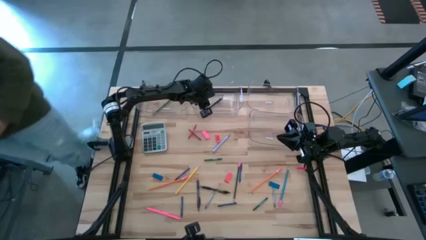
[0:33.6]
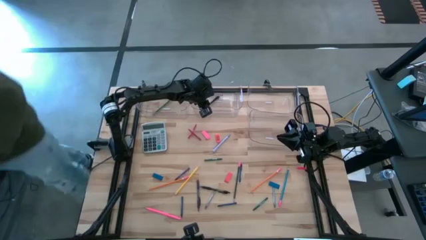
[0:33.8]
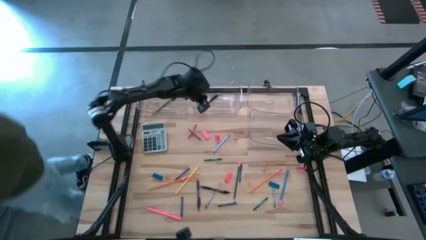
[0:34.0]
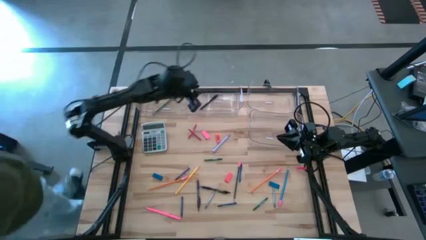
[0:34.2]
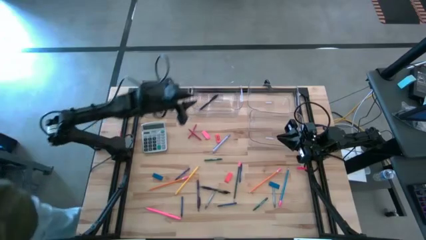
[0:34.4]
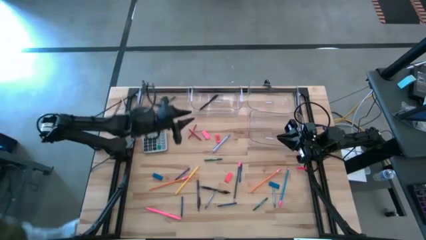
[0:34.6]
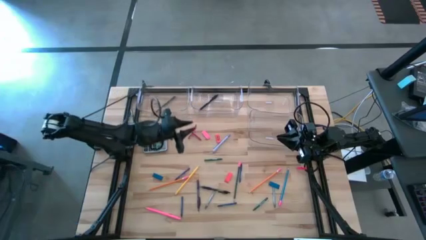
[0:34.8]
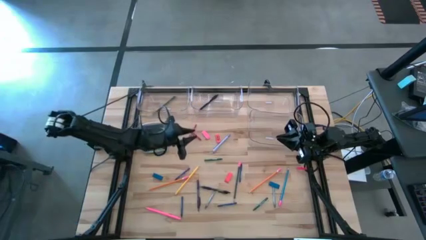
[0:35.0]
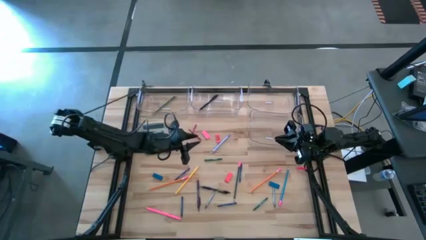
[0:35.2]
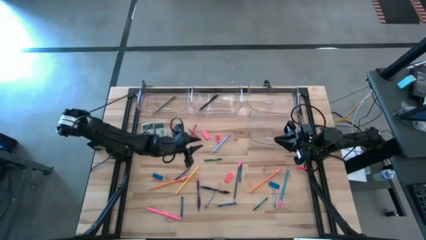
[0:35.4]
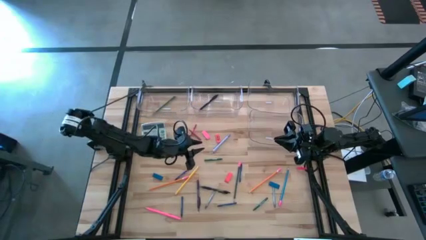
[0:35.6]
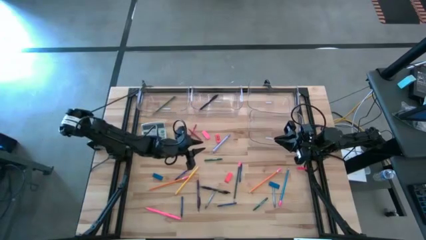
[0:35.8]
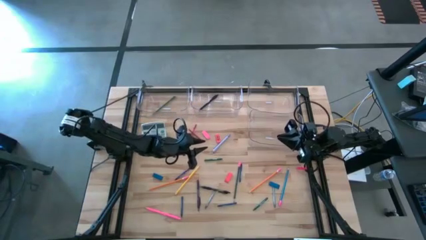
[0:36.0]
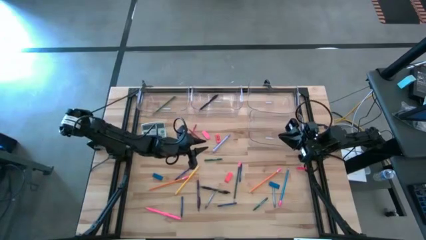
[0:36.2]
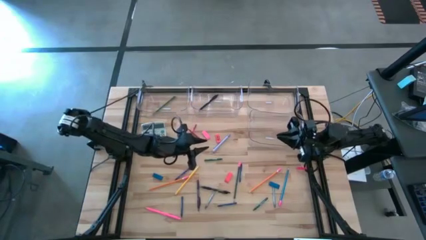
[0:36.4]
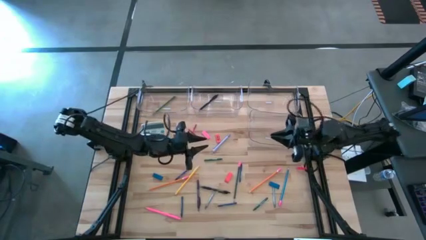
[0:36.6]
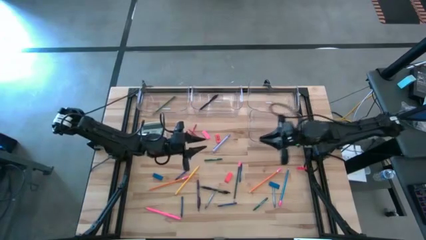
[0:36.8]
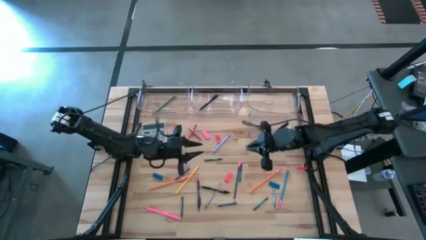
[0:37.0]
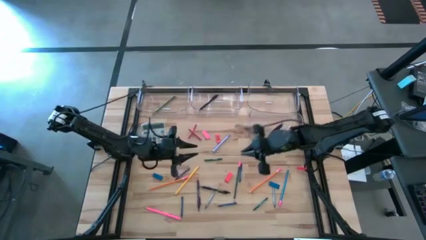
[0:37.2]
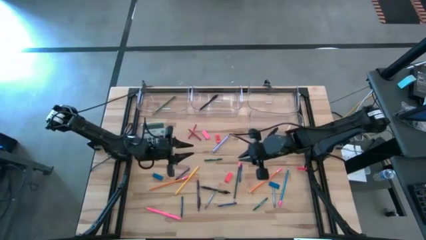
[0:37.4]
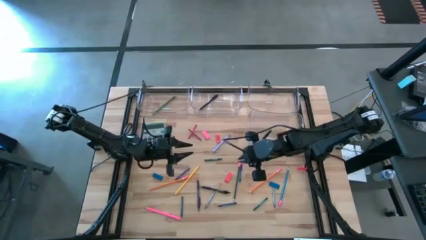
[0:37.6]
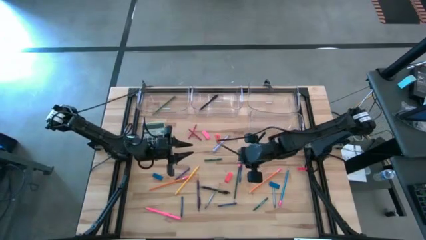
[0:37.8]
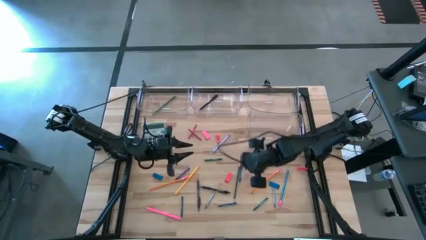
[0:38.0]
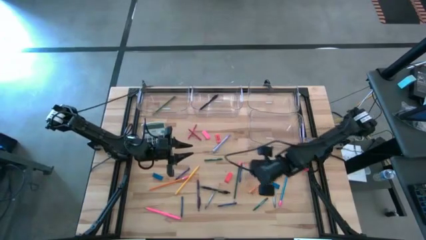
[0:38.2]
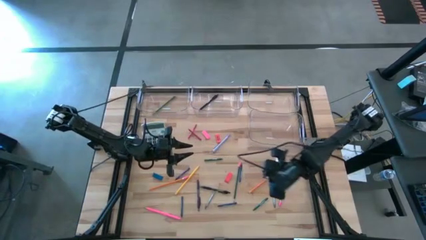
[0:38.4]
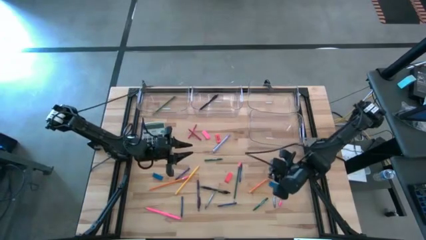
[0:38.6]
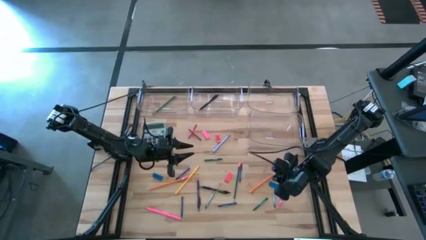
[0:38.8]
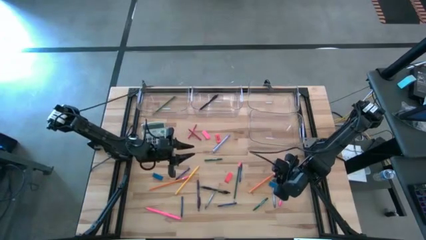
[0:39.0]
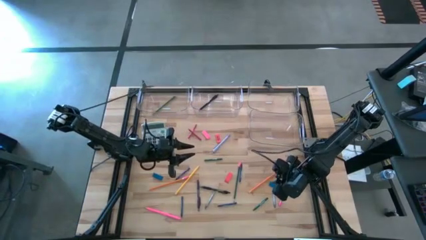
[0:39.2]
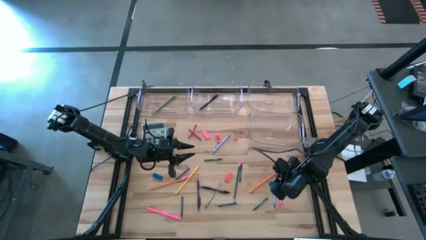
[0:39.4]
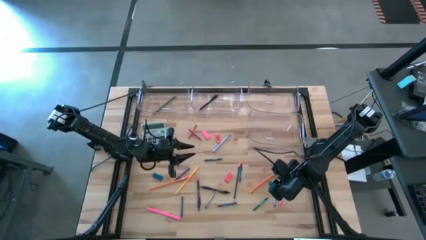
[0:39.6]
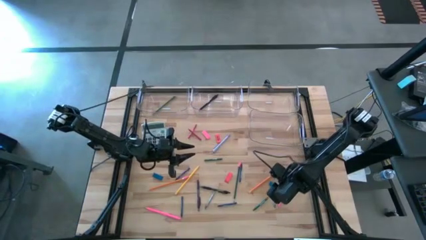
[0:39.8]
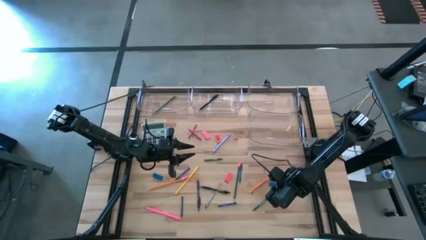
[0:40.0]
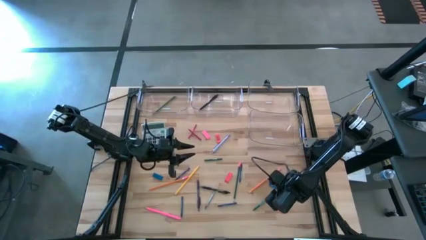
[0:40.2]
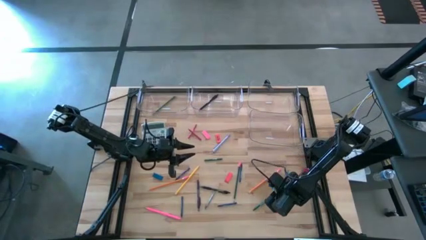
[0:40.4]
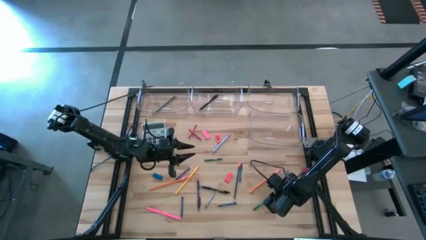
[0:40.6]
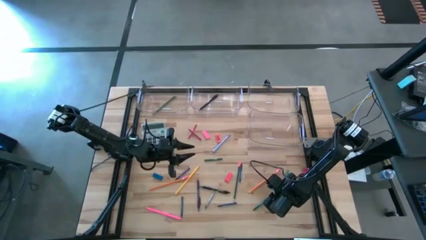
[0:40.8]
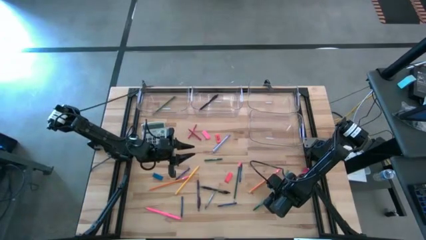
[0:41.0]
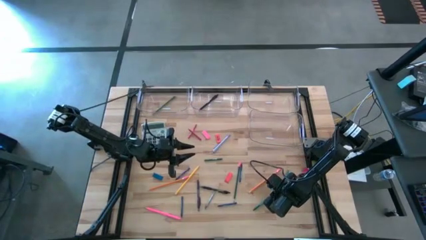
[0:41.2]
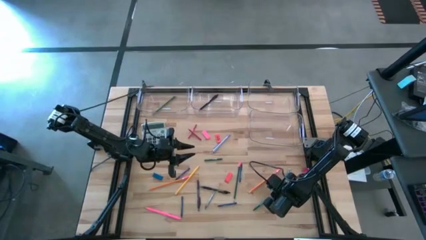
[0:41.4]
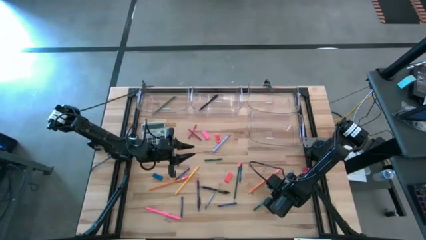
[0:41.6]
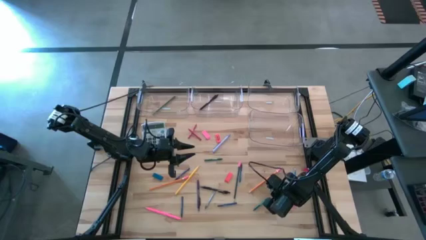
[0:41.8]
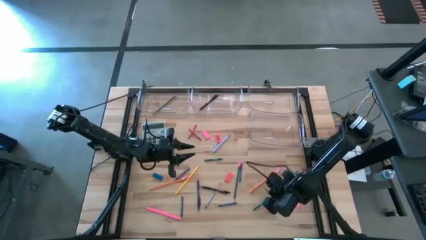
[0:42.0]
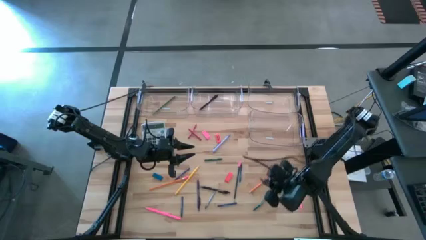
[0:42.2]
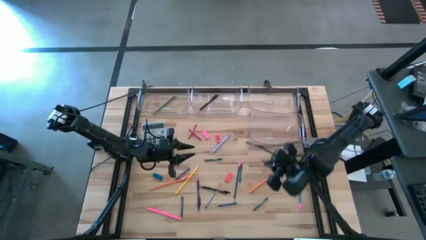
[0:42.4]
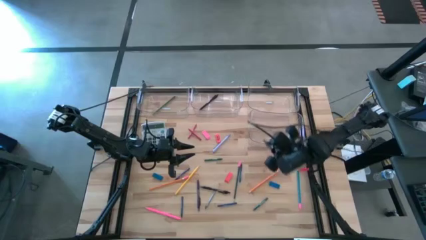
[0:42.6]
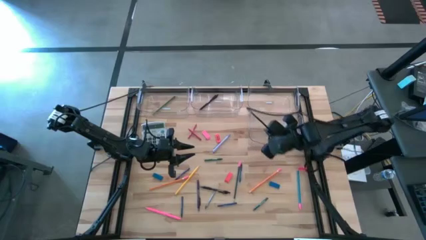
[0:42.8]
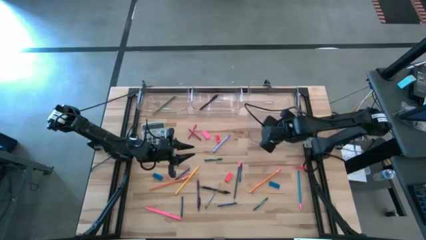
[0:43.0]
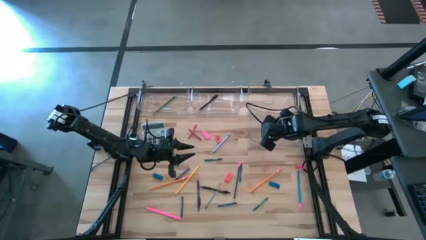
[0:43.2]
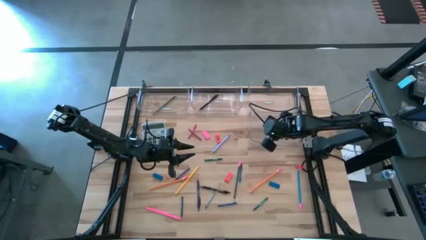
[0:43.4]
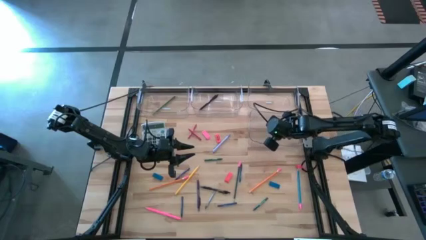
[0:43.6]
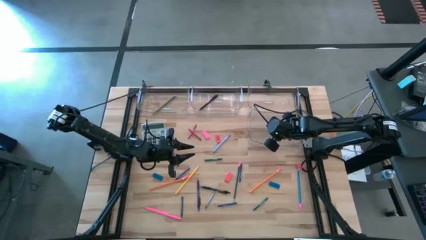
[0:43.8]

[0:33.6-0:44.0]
Task: Sort crayons/erasers/pens/pencils in bins
Put the gray crayon into the bottom transparent bin

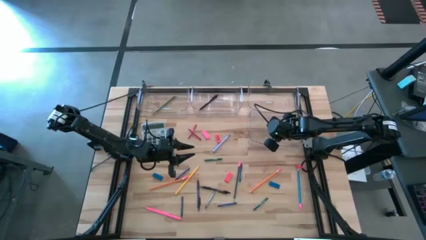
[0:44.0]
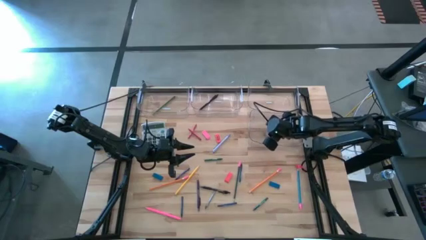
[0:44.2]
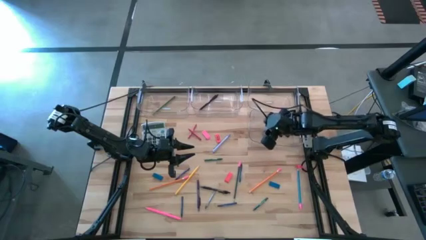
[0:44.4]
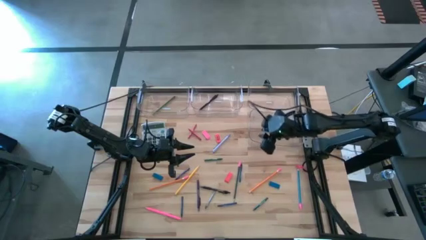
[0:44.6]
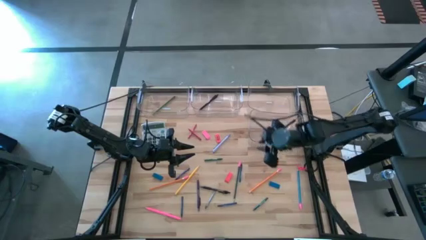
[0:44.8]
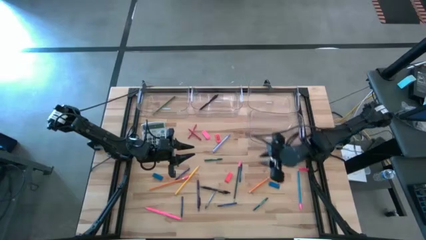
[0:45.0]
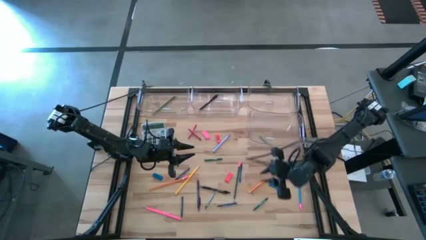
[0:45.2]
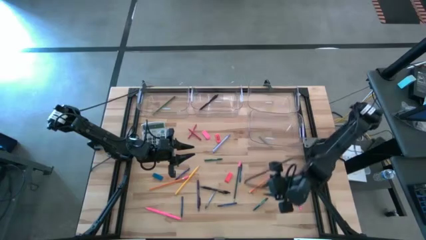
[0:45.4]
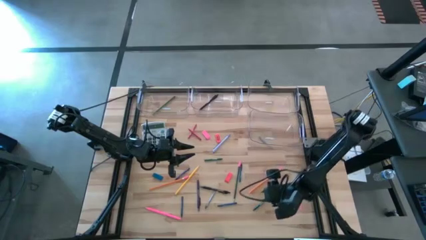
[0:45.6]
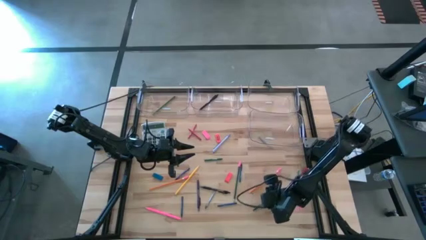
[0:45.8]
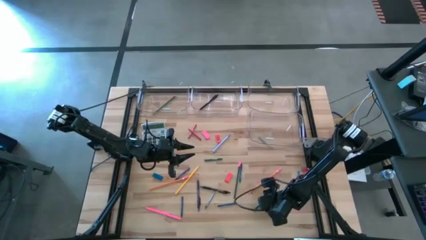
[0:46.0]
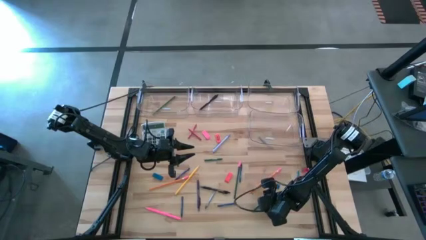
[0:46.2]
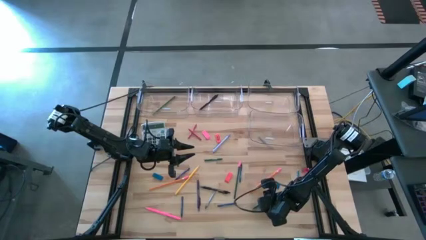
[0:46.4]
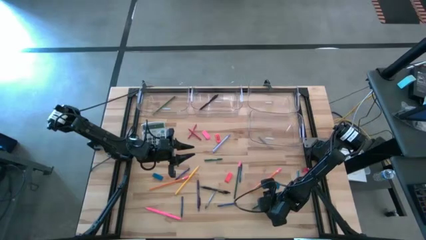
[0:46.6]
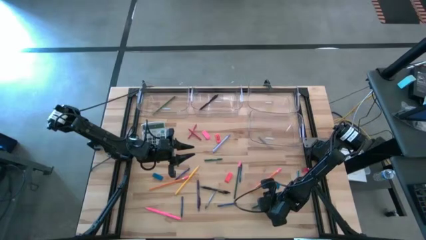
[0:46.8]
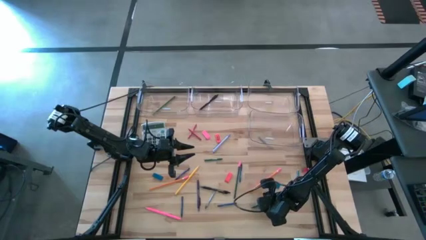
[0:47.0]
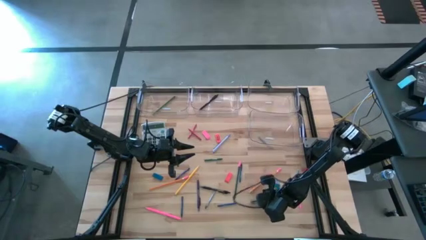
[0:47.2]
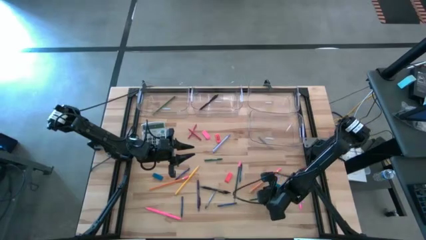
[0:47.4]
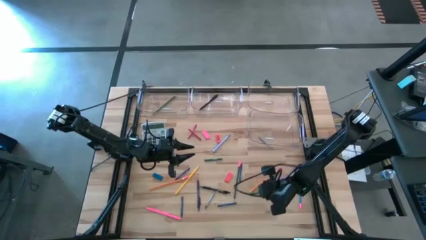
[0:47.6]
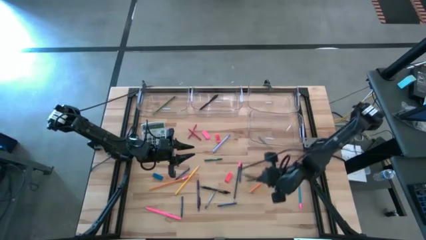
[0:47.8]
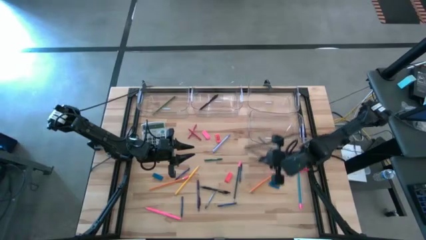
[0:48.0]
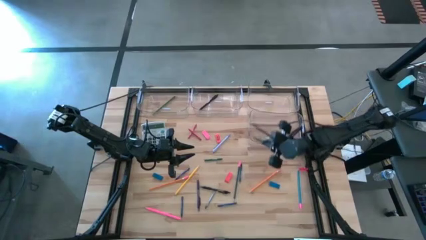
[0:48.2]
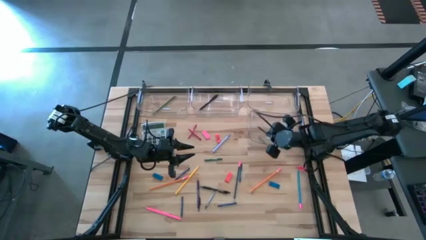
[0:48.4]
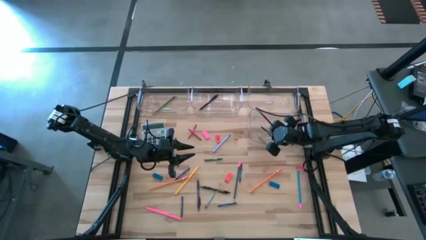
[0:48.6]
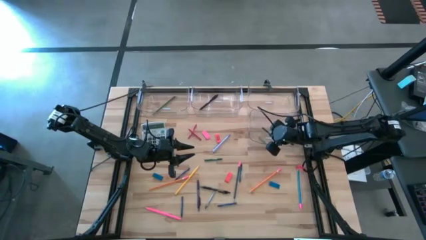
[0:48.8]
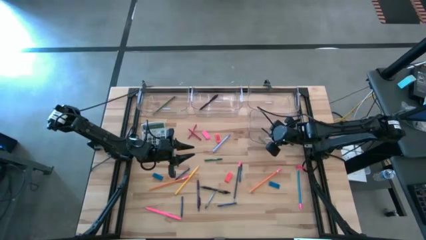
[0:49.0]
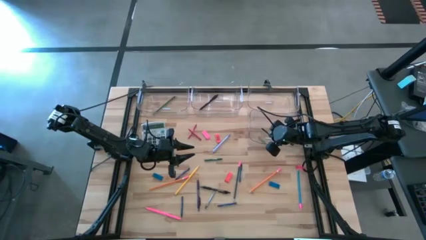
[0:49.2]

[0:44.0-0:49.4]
Put the green crayon into the bottom transparent bin

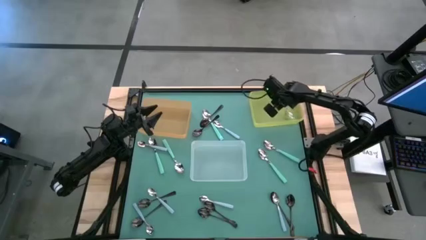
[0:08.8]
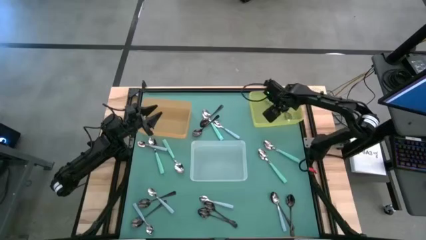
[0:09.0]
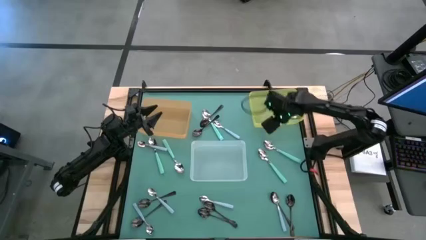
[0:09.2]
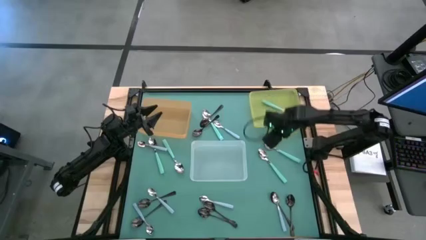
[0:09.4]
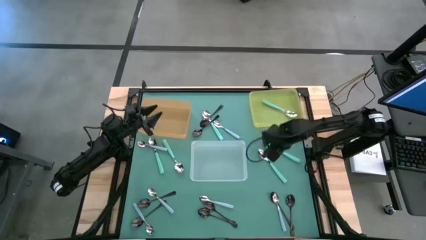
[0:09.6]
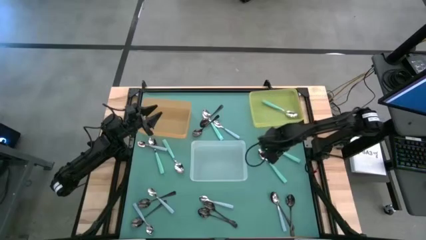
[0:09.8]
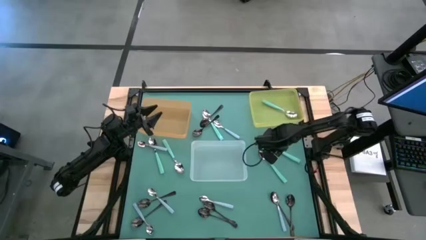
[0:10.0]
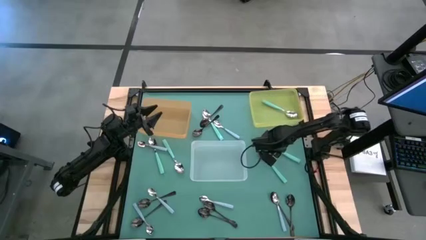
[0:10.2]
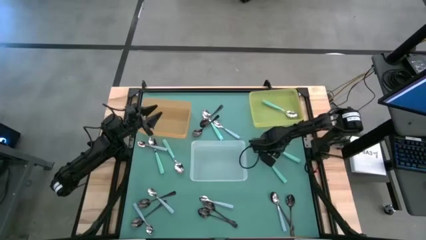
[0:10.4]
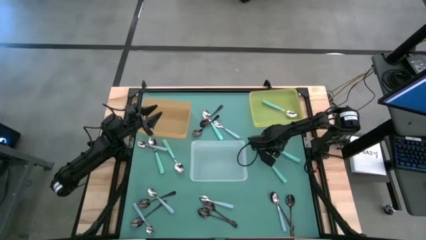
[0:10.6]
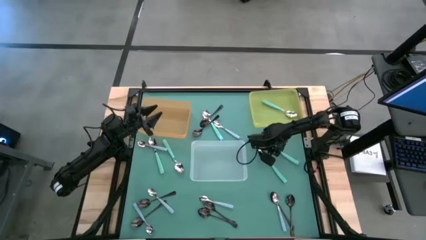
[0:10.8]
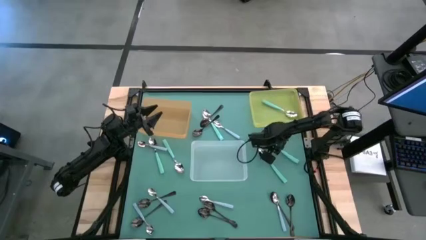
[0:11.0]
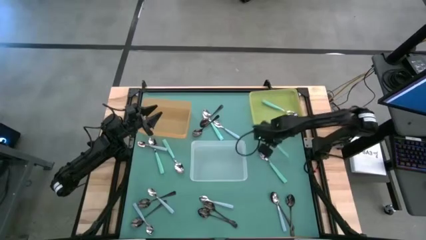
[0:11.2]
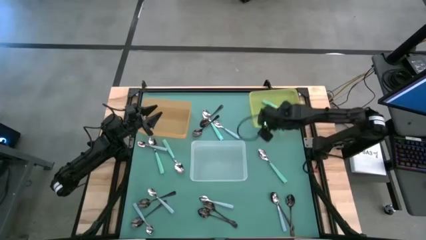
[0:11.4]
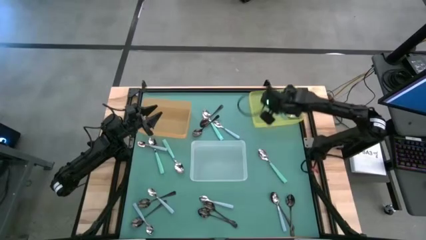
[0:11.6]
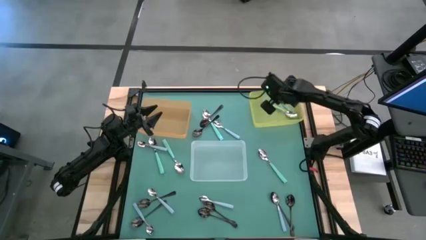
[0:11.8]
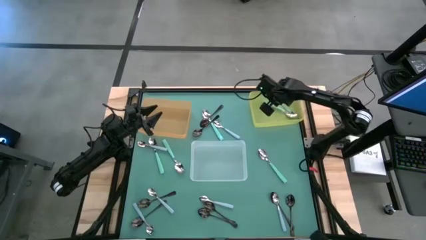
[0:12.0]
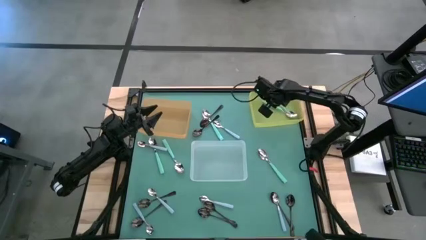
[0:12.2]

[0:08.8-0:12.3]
Task: Sort silverware by color (type)
Put the light blue spoon into the yellow bin
